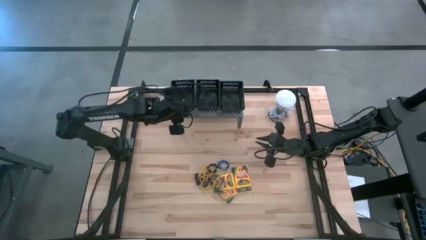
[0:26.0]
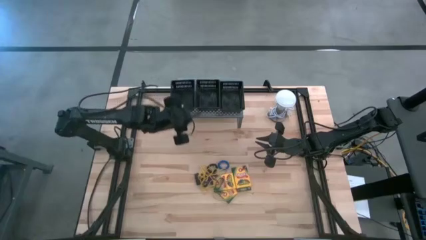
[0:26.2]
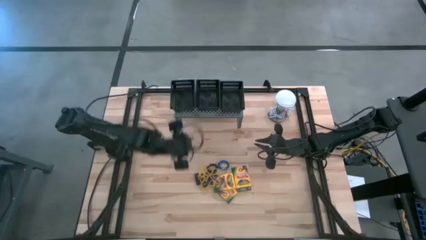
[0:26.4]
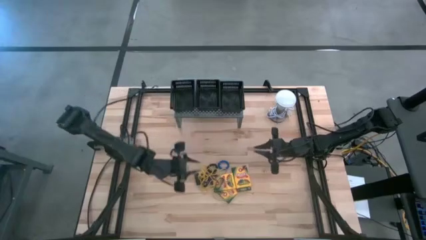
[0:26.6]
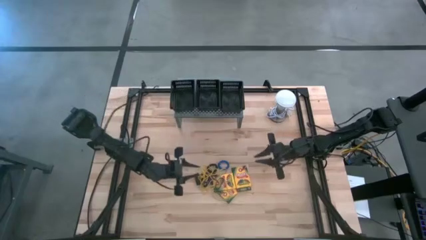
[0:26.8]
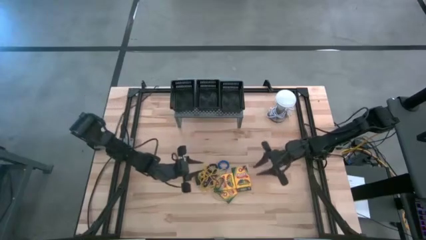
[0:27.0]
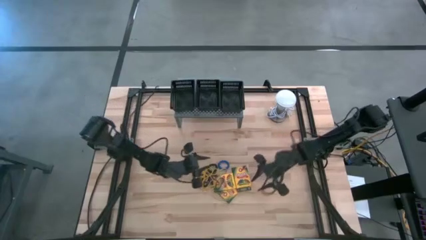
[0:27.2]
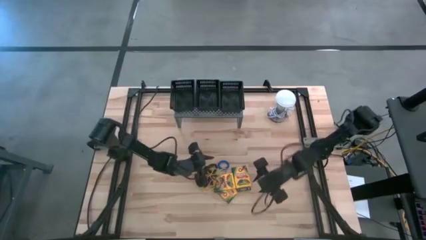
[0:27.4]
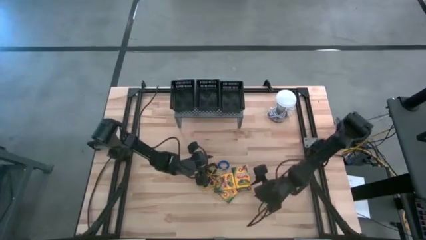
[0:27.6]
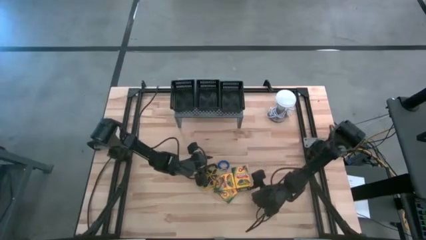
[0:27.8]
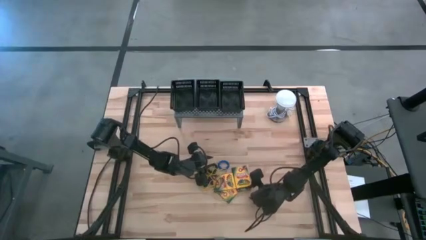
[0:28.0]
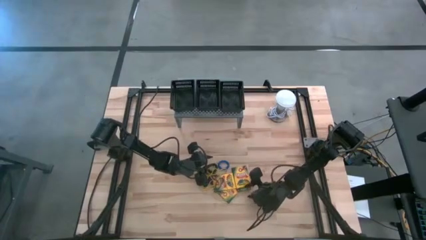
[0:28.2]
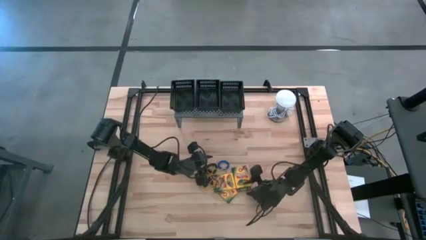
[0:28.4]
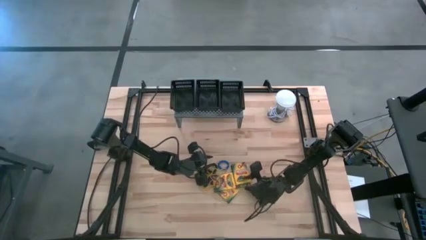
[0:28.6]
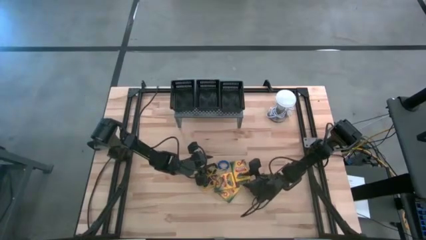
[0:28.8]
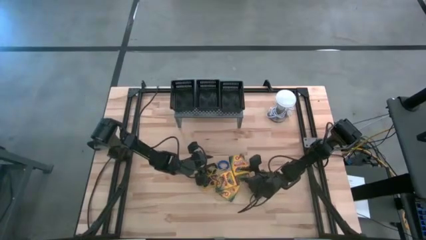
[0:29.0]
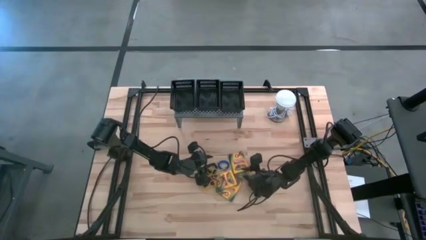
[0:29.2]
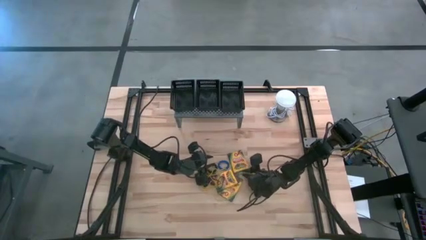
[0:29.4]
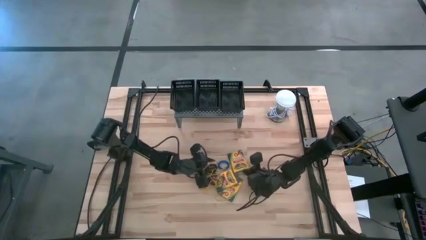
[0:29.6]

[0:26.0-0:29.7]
Task: Pick & Place Office Desk Supplies
Put the crayon box into the right black bin on the shelf

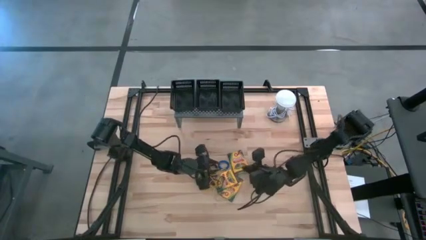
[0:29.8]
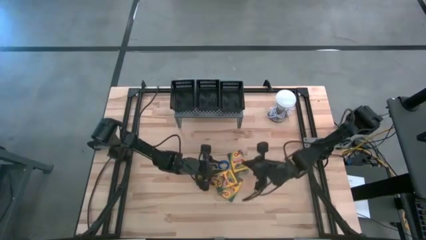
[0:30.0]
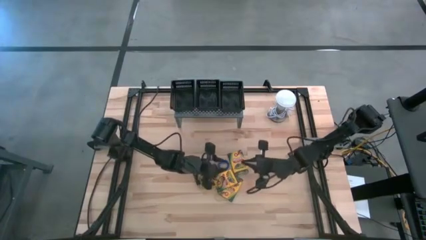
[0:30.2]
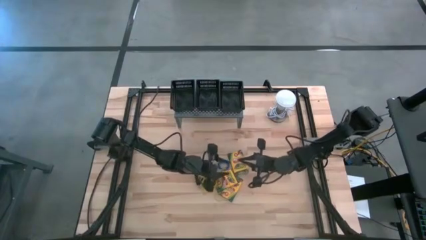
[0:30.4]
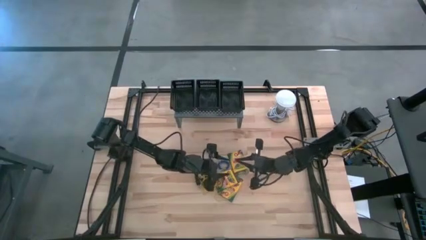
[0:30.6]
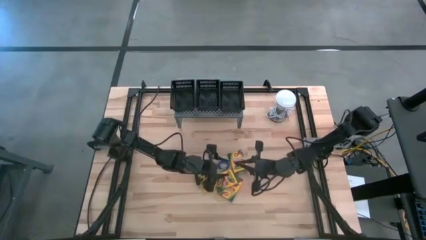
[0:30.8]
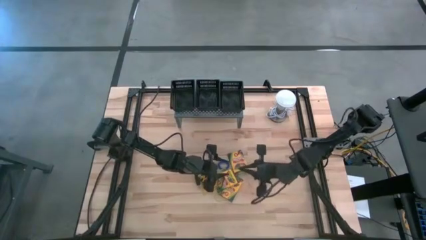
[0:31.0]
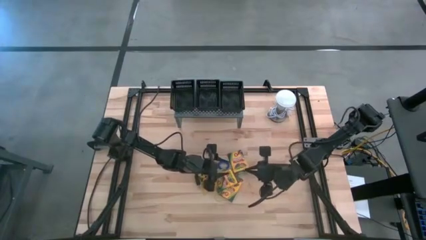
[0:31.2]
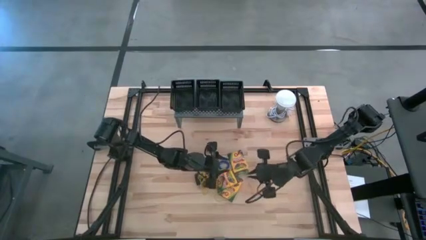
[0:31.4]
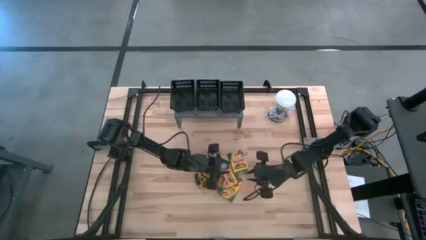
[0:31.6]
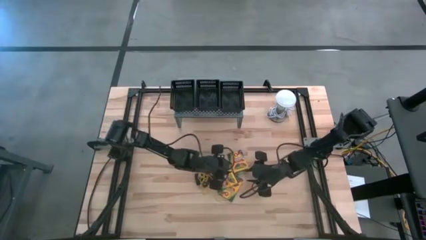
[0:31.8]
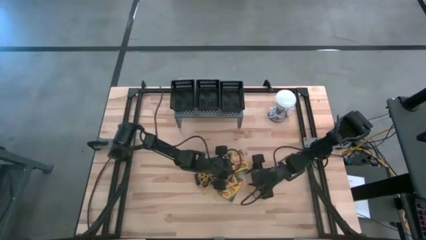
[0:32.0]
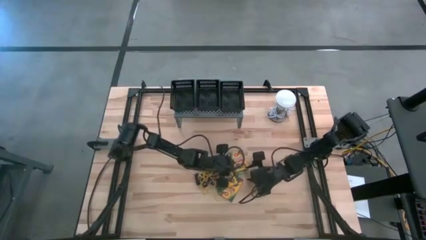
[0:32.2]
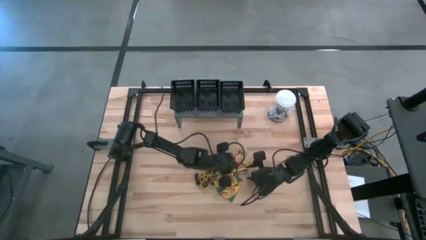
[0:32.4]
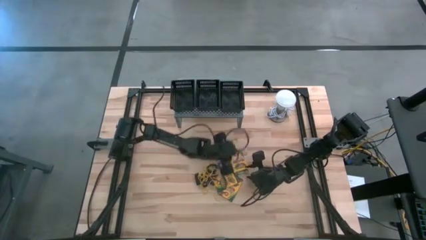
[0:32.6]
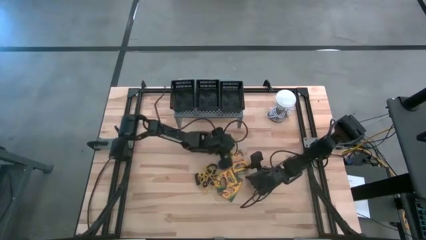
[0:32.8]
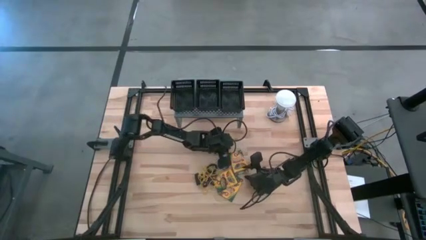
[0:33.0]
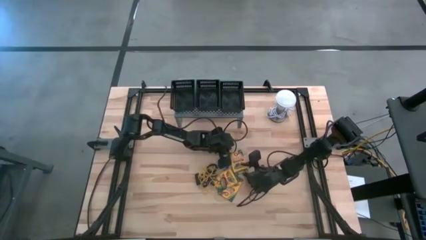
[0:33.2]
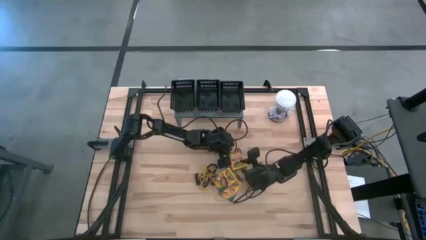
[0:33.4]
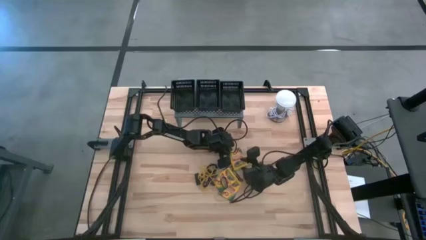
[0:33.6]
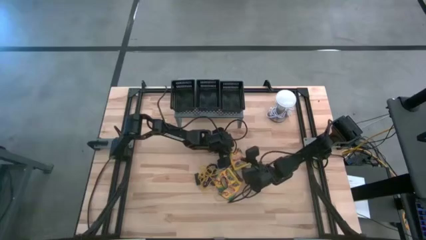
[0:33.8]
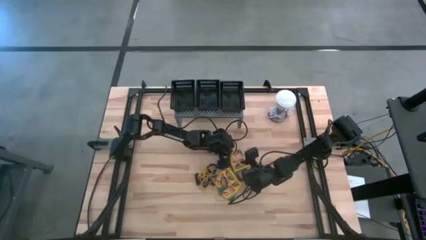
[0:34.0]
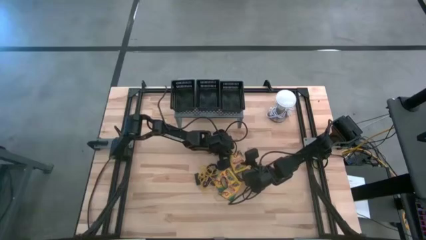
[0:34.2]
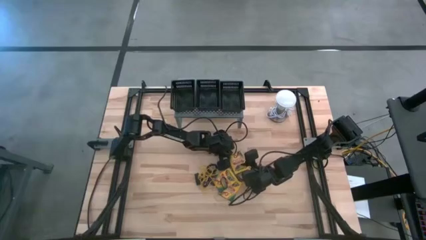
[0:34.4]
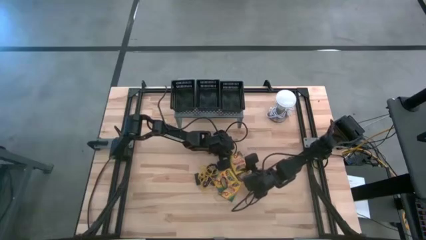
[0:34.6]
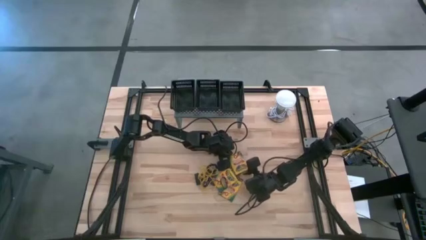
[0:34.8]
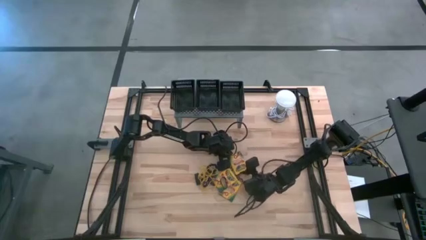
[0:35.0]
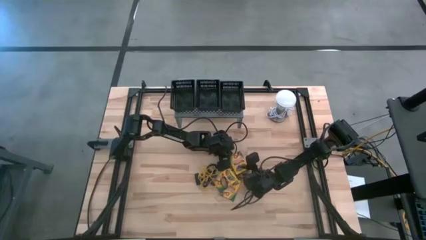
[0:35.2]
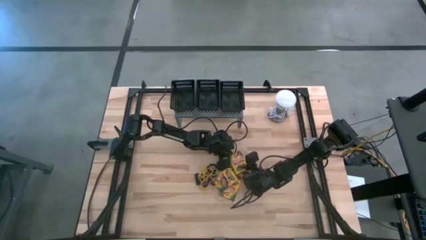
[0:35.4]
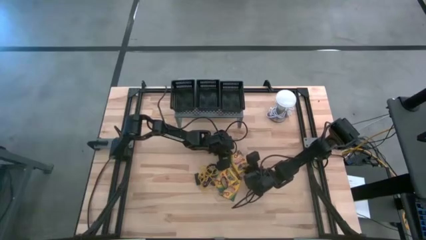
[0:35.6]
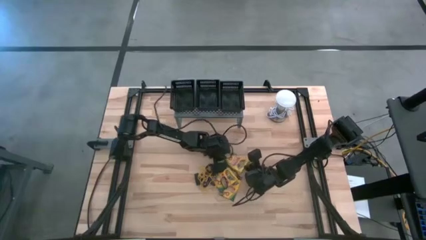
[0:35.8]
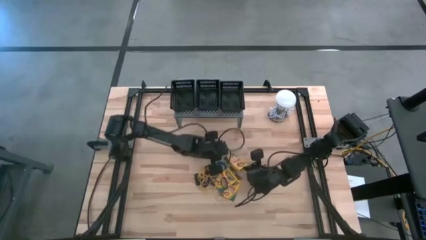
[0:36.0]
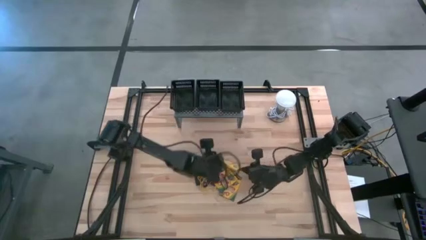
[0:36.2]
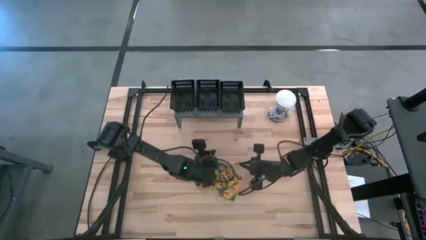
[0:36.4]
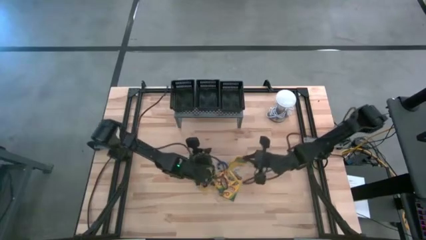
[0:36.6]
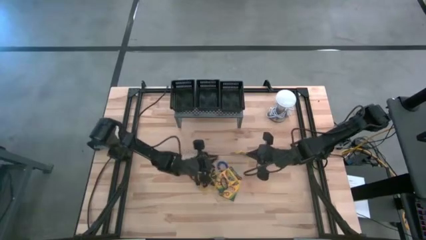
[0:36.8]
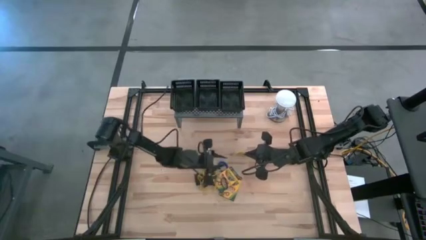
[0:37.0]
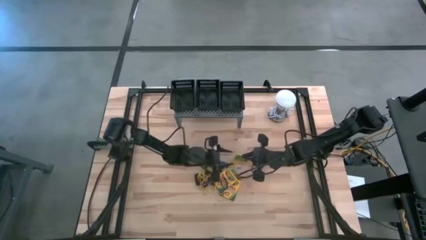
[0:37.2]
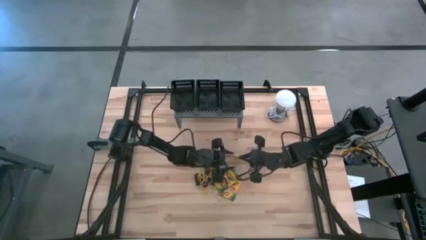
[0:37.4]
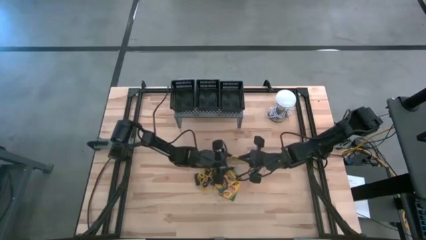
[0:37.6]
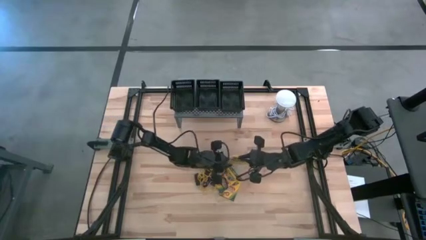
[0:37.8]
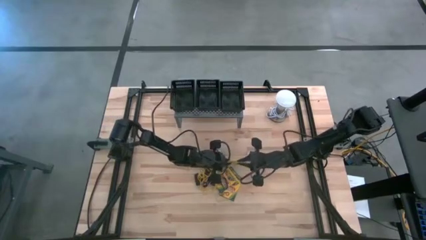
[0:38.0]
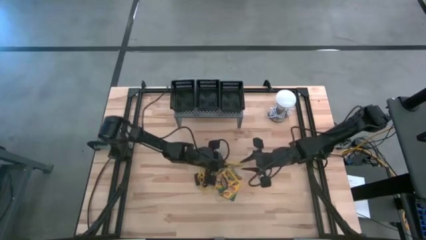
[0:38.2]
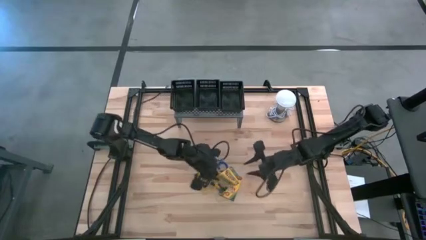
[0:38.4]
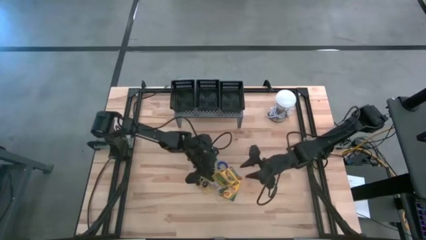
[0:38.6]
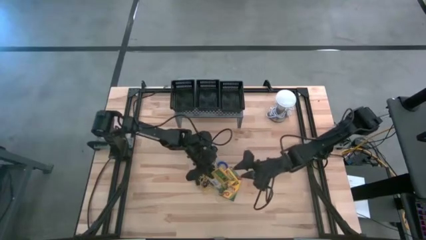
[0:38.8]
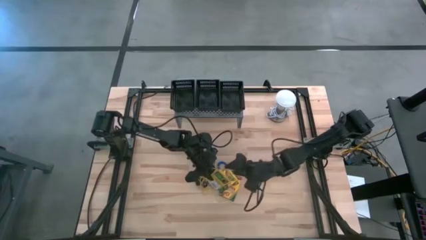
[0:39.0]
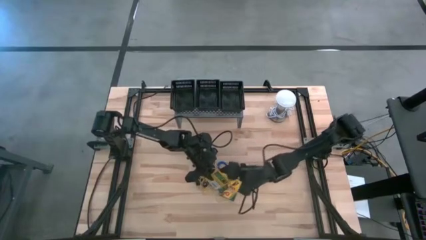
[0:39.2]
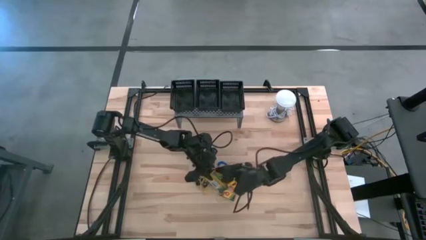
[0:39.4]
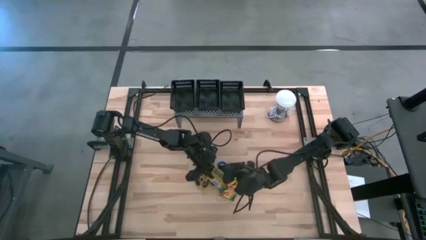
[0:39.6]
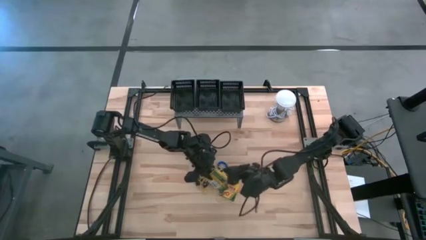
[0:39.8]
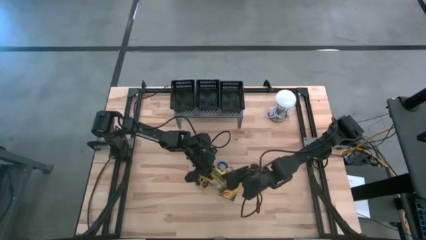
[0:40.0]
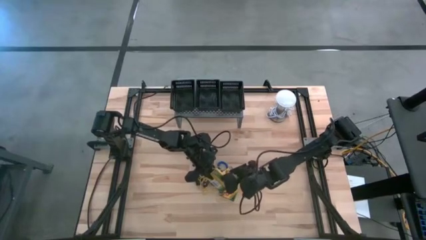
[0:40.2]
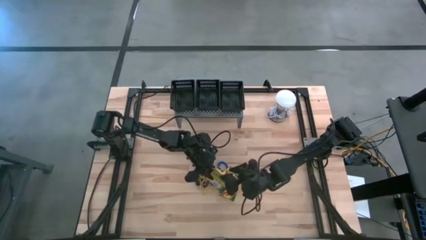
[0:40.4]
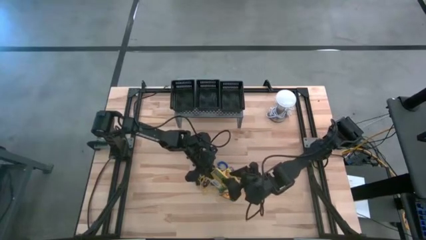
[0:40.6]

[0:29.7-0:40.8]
Put the crayon box into the right black bin on the shelf

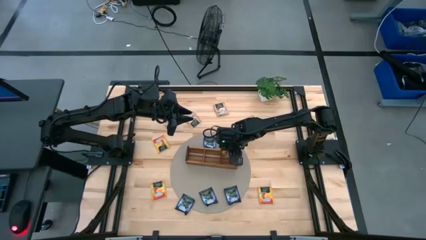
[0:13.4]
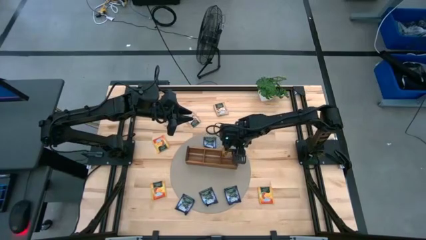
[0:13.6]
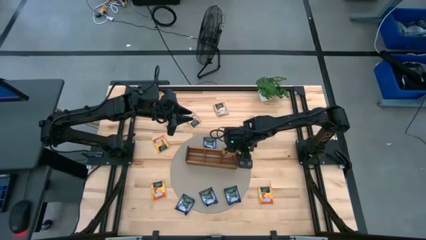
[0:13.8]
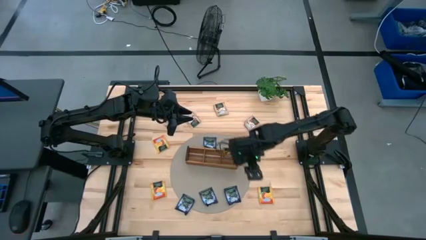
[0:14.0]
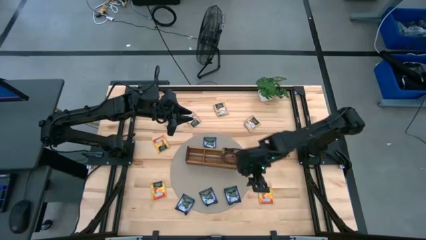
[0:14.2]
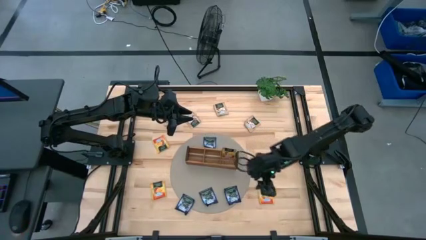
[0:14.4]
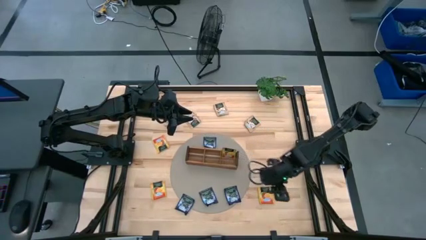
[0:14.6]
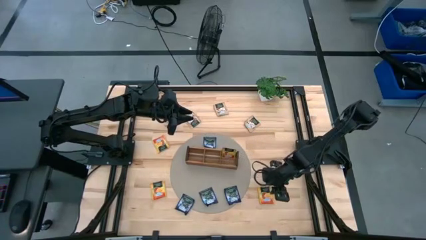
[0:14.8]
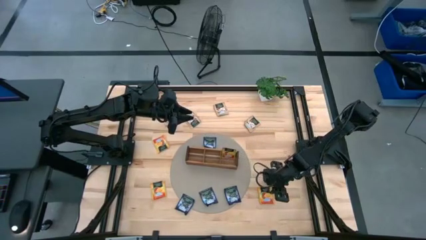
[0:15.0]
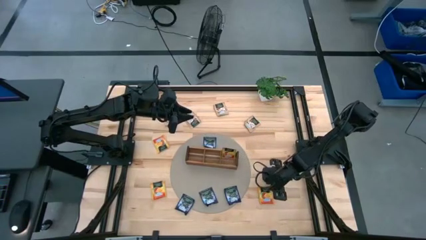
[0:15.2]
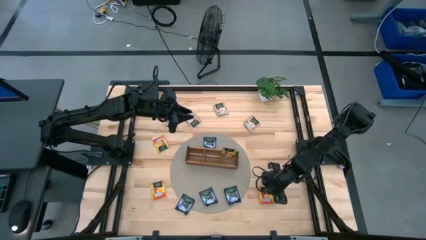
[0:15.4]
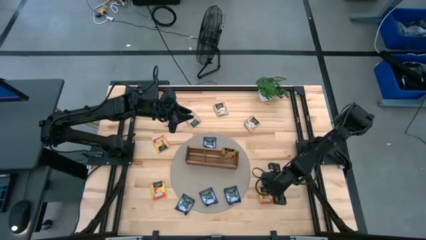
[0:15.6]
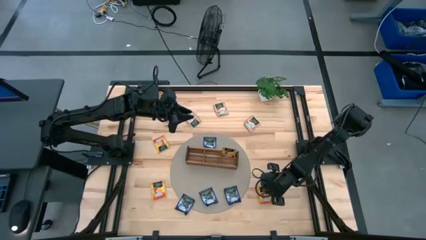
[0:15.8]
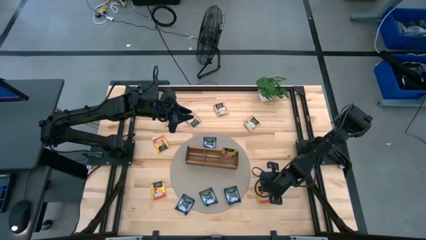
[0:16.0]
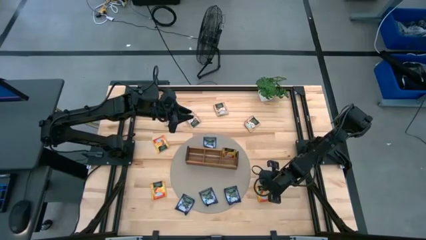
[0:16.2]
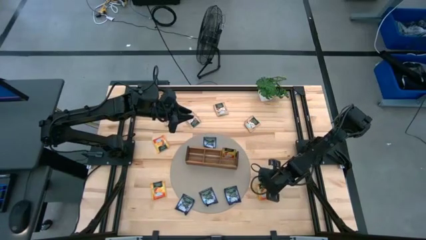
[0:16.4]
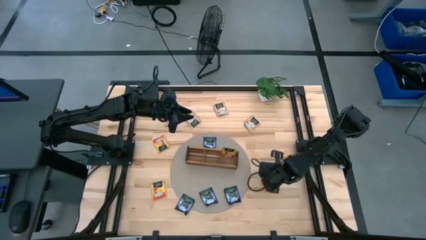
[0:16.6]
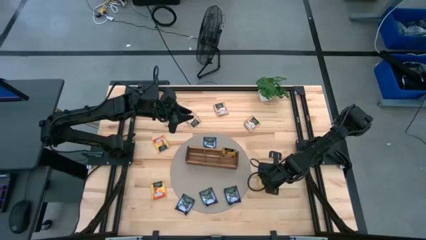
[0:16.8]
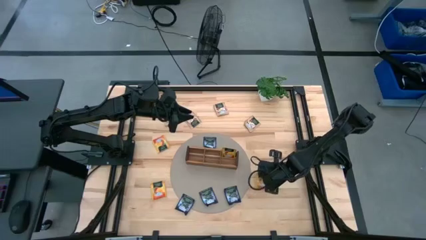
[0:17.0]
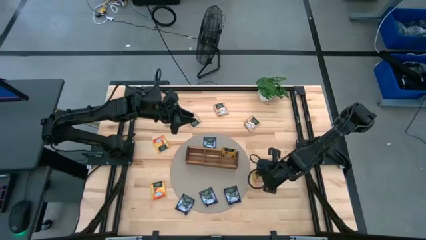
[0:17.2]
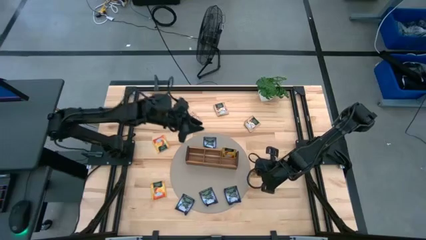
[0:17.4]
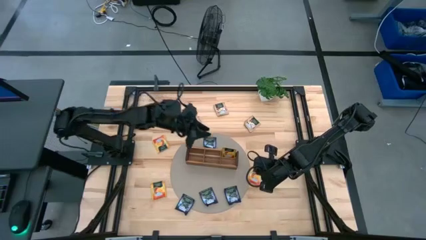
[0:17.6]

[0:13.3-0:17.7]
Task: Pick & Place Tea
Put the yellow tea bag into the right section of the wooden organizer
